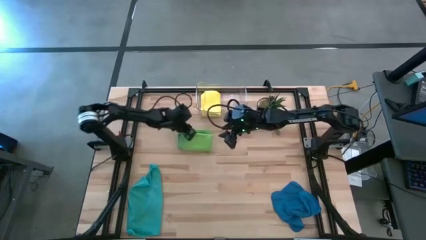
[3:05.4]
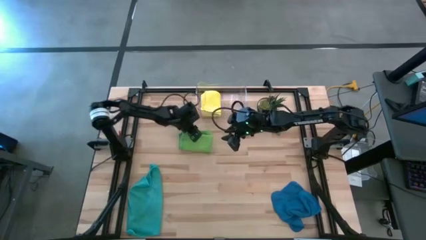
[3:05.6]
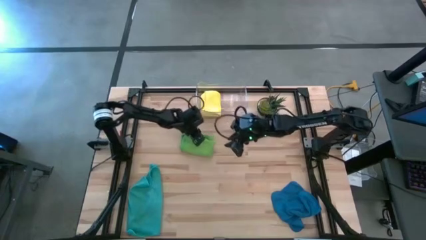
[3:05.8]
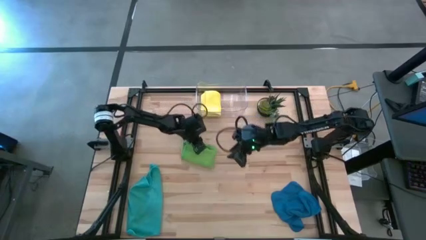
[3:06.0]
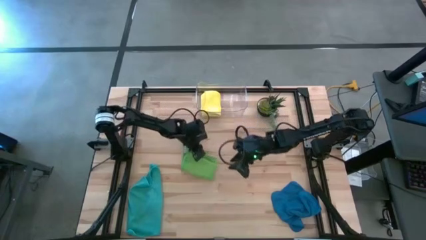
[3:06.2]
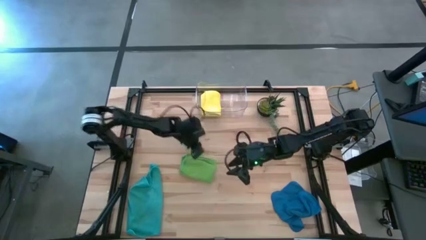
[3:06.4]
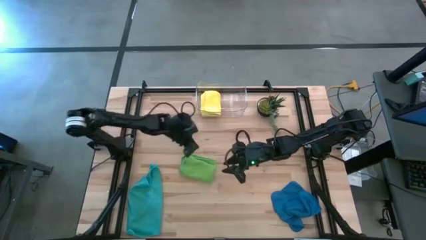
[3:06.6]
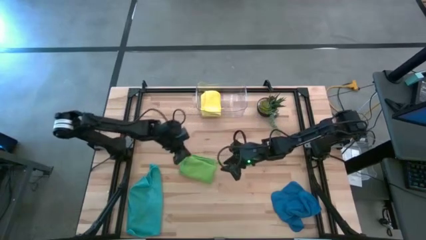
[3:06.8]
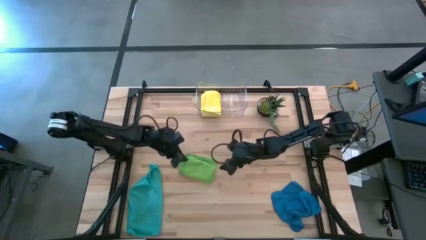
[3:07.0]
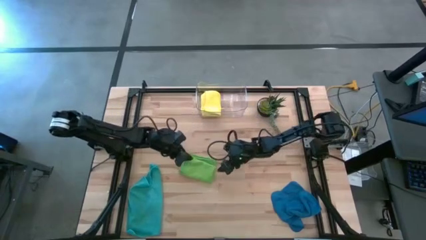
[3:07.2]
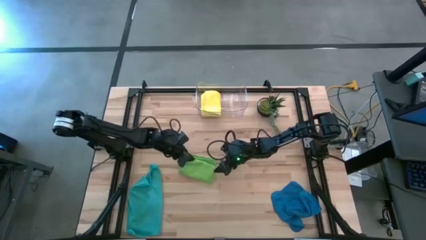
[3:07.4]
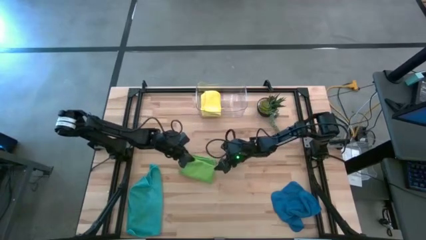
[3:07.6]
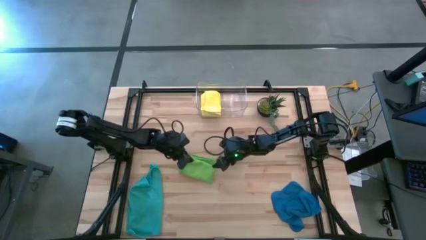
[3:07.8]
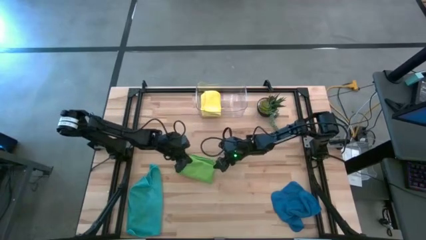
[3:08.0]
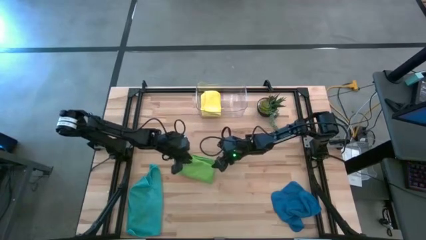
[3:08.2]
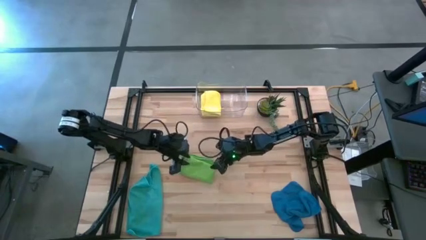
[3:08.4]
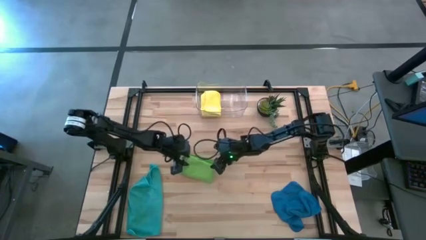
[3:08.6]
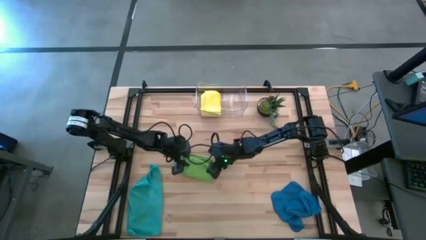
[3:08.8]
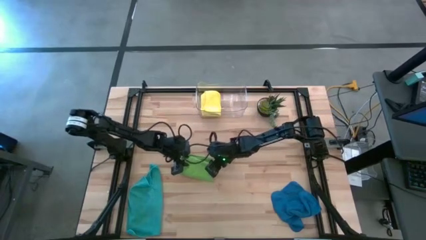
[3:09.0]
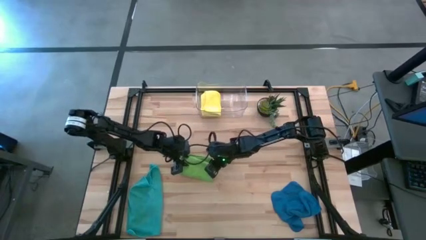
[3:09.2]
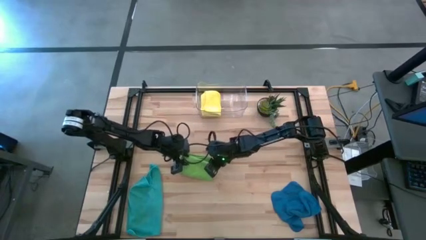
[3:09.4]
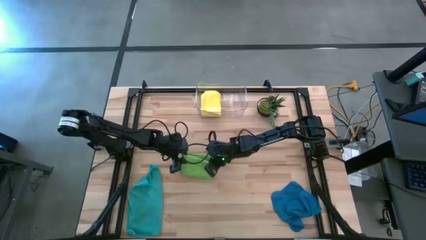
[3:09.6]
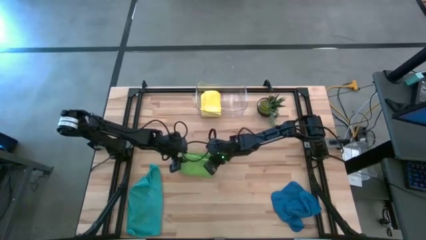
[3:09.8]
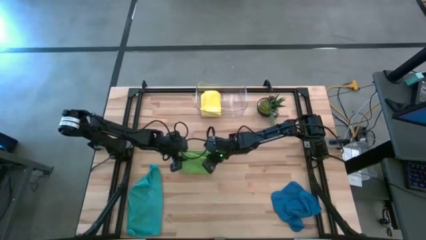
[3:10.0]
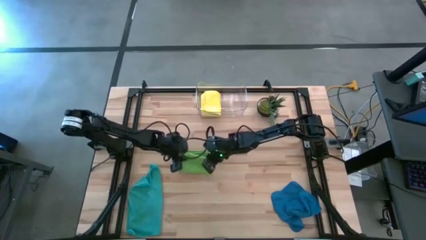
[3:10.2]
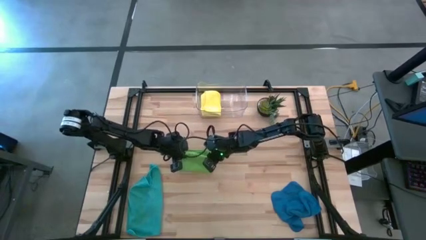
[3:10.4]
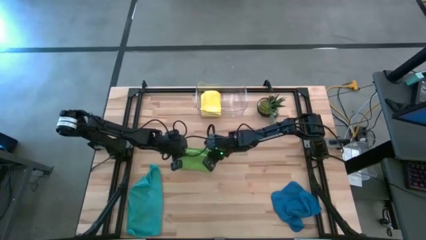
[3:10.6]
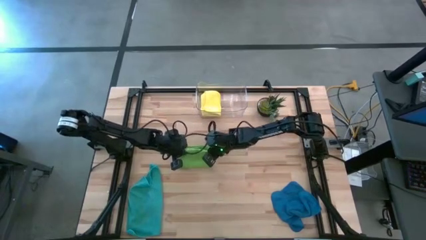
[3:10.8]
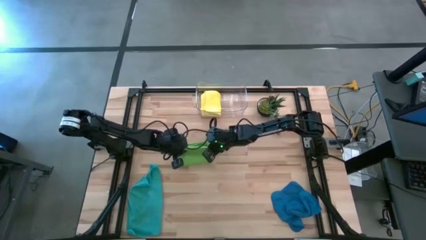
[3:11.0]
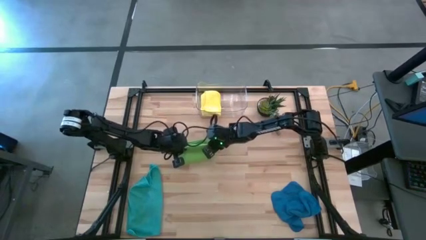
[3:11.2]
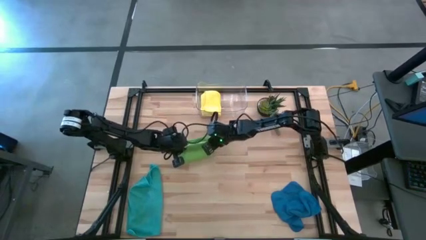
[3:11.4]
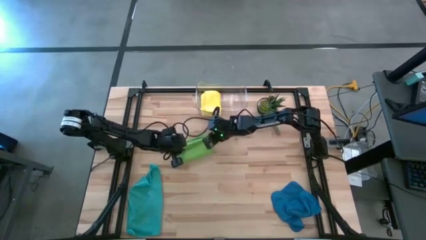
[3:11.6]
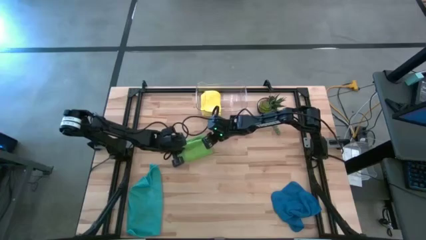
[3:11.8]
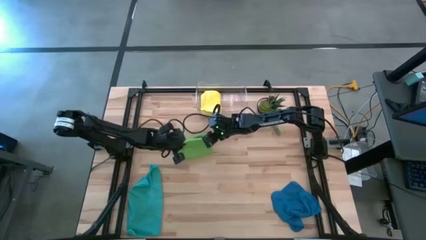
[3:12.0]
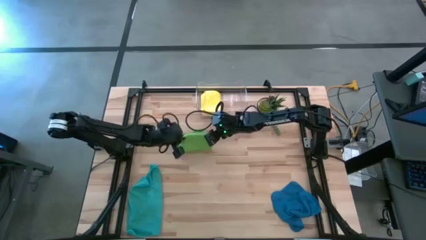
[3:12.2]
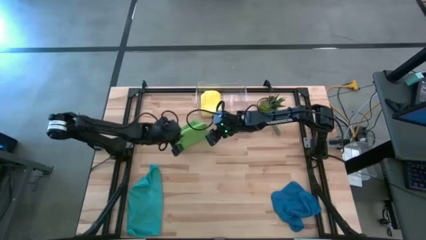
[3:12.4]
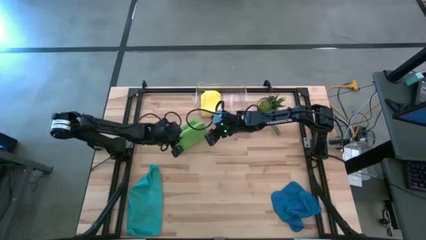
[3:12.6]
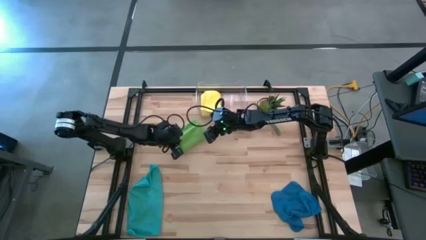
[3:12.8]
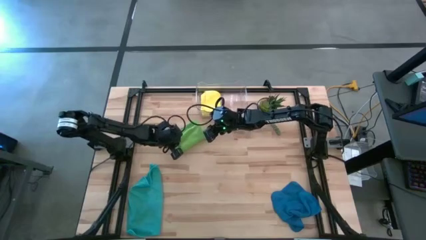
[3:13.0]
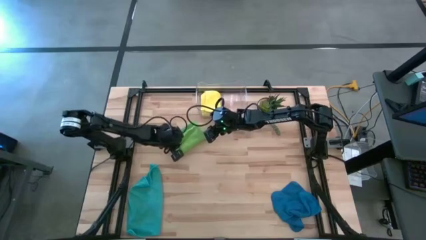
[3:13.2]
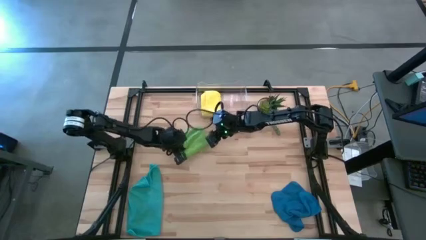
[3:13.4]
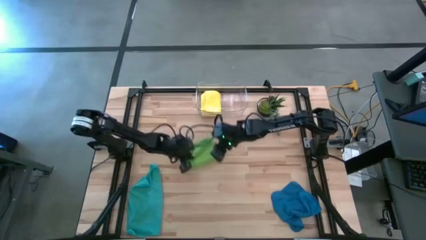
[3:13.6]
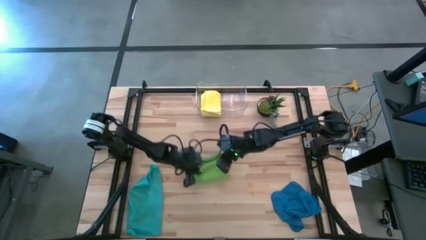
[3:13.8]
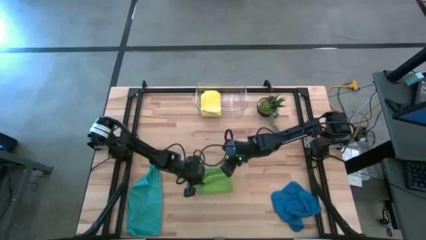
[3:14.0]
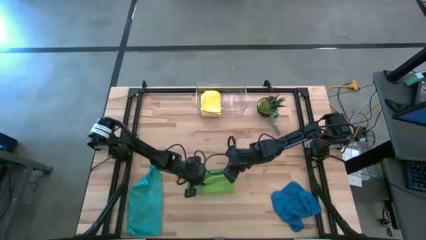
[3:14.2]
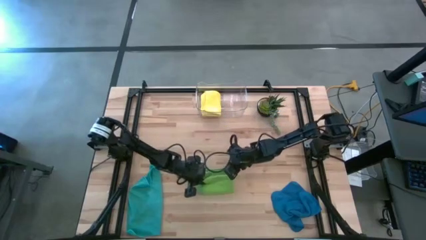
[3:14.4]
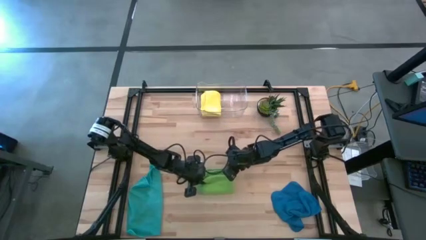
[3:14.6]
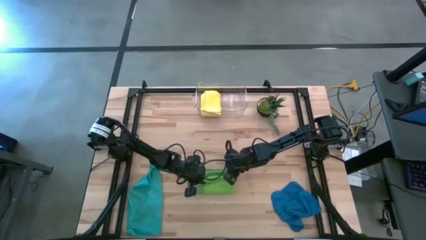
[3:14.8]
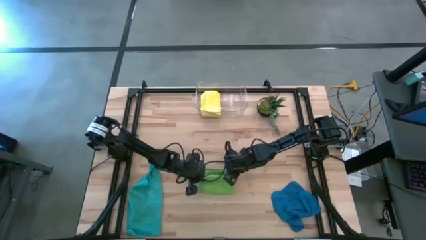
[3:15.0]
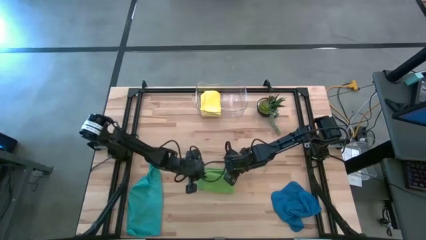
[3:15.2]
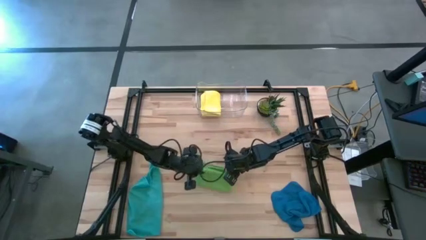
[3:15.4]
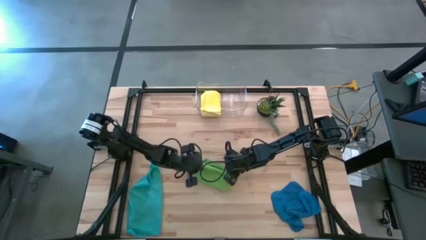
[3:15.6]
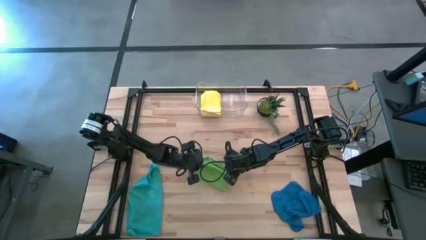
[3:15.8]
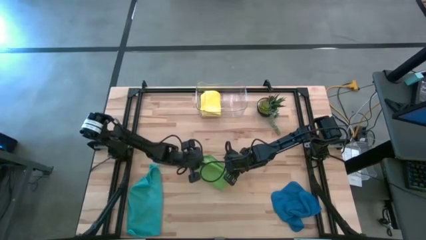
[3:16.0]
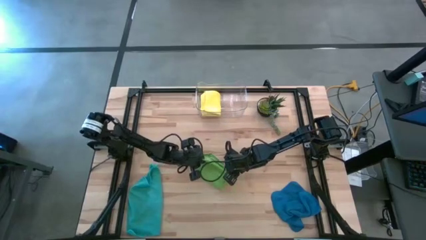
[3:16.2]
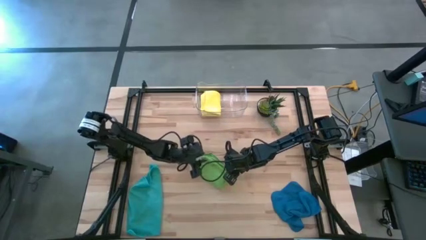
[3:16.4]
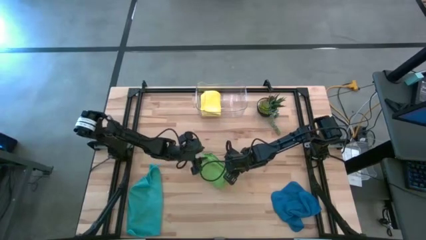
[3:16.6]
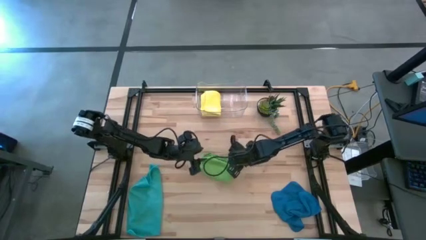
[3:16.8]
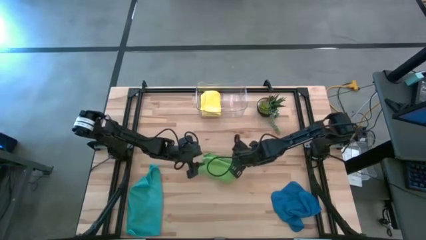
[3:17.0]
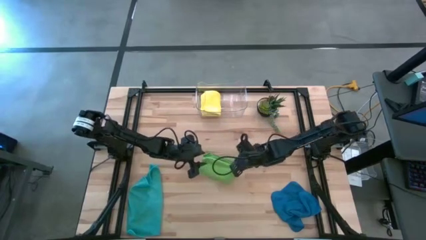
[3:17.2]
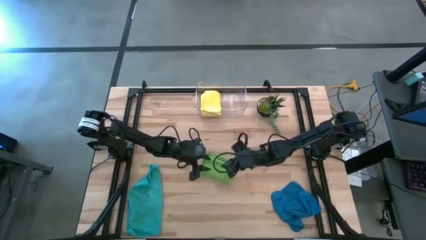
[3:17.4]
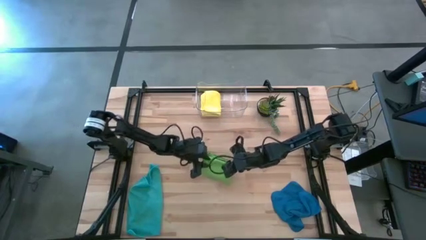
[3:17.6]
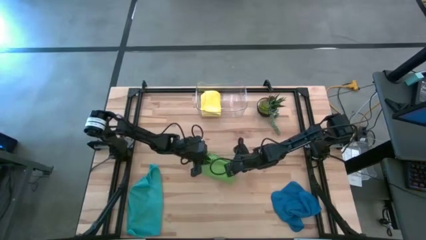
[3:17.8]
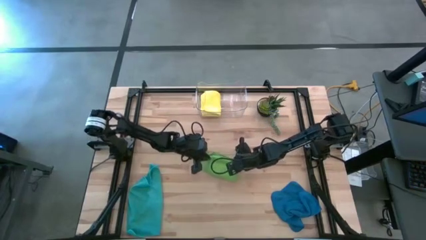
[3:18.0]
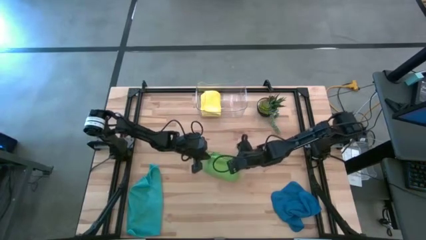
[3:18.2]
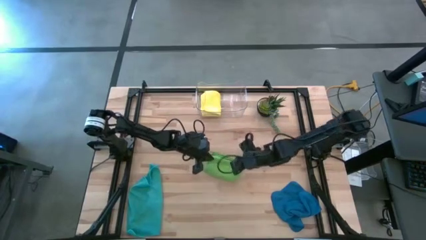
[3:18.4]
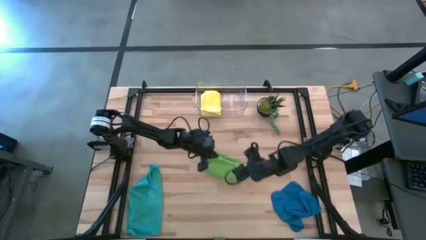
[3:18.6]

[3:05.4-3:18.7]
Task: Fold microfiber towels
Fold the green microfiber towel

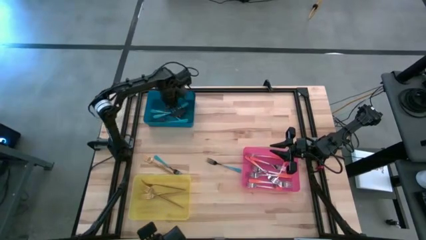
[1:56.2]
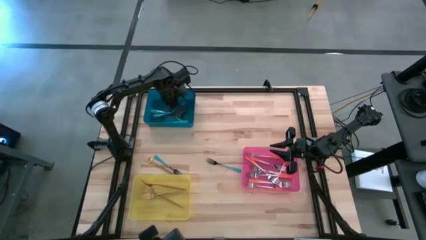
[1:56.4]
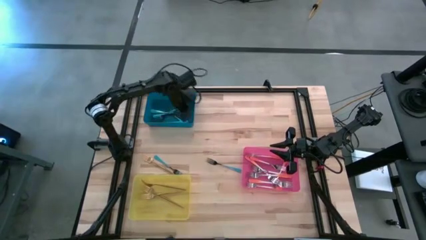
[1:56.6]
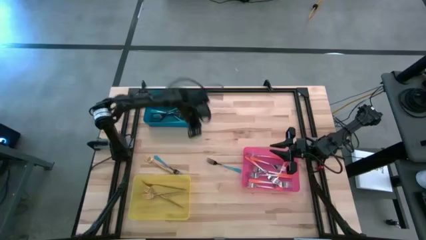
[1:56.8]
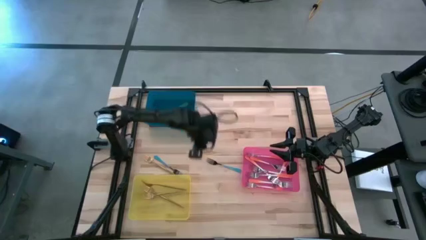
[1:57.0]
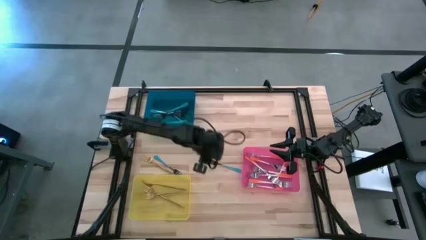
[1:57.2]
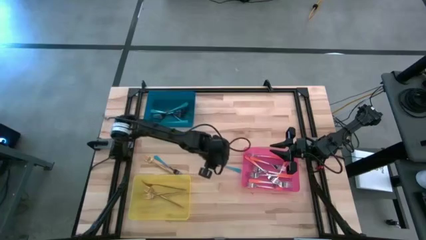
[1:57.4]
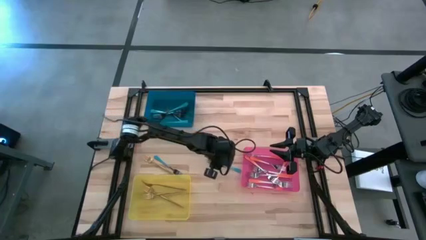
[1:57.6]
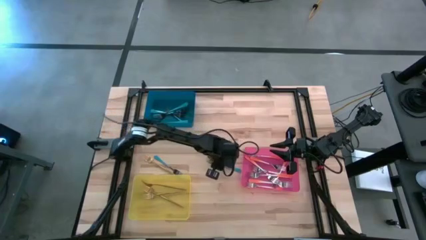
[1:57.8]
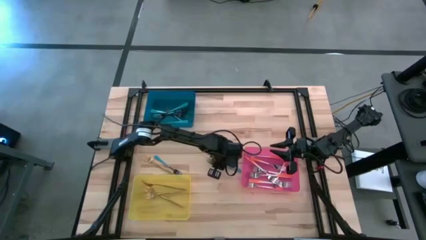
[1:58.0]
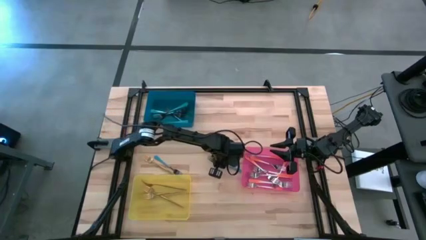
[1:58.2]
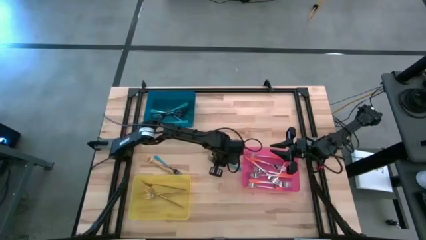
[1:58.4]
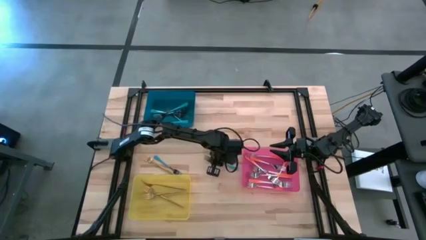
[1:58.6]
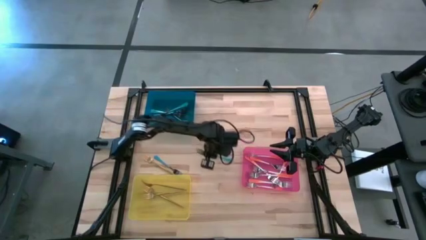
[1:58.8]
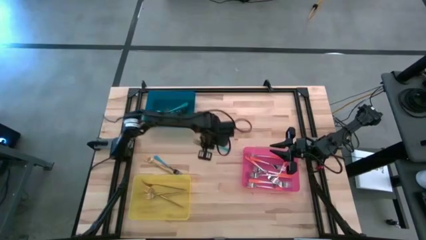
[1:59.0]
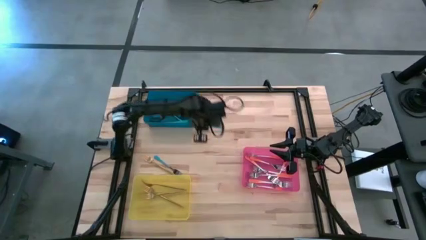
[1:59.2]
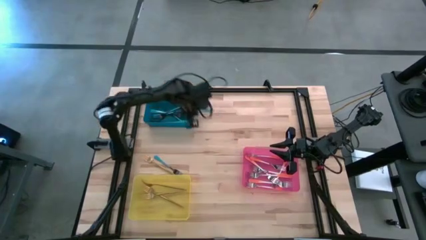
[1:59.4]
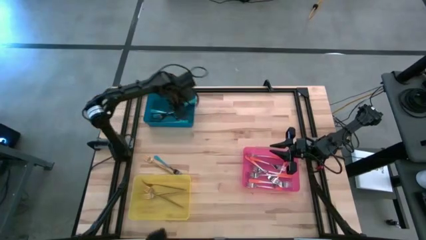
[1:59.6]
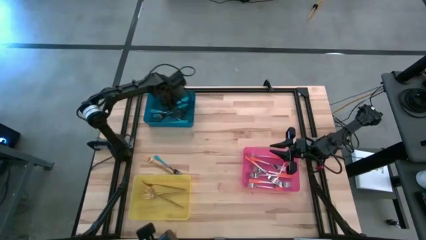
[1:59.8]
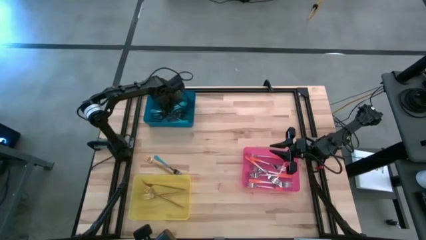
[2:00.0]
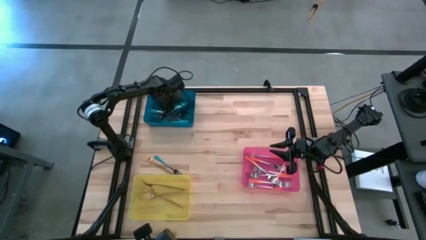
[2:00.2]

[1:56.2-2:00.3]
Task: Sort silverware by color (type)
Put the blue fork into the blue bin
